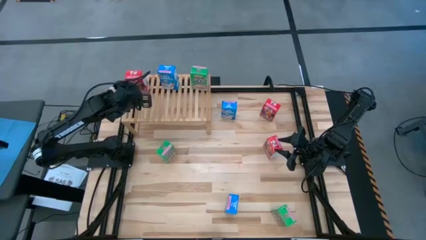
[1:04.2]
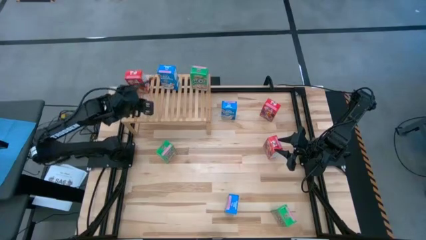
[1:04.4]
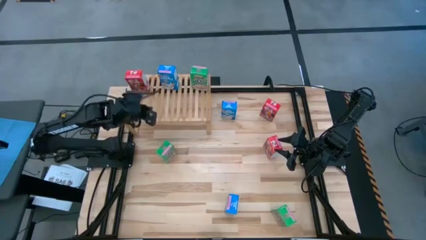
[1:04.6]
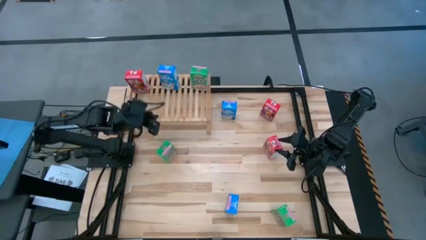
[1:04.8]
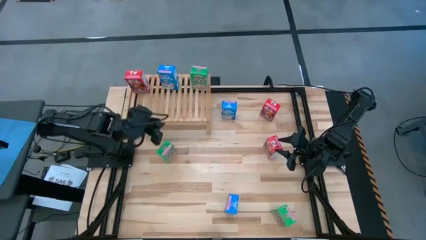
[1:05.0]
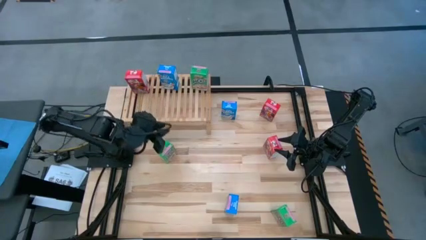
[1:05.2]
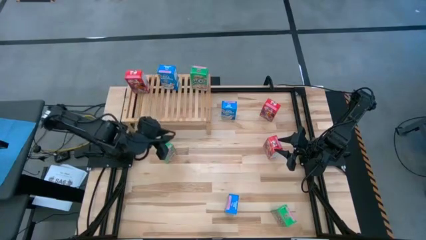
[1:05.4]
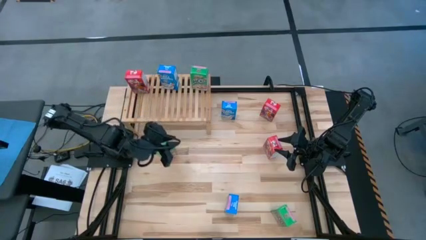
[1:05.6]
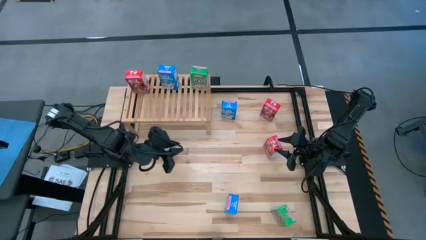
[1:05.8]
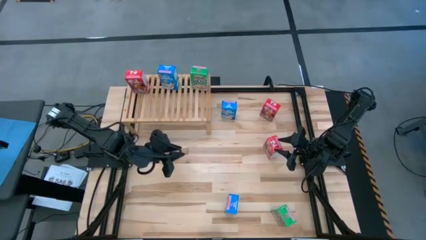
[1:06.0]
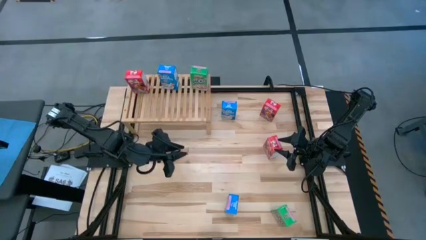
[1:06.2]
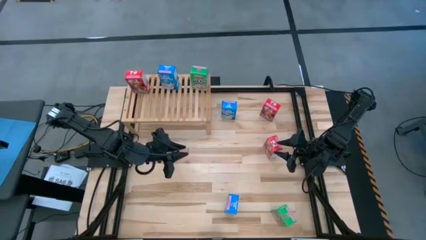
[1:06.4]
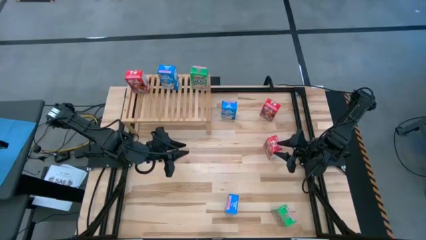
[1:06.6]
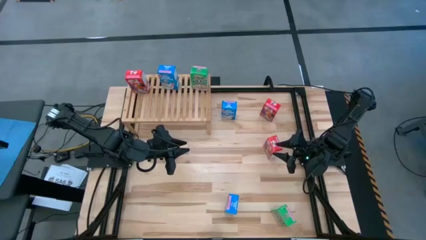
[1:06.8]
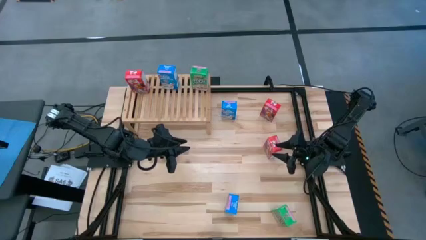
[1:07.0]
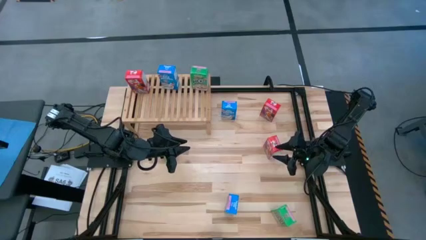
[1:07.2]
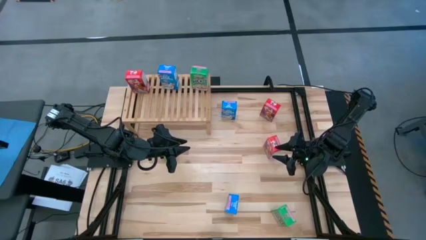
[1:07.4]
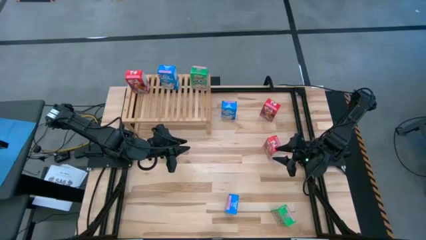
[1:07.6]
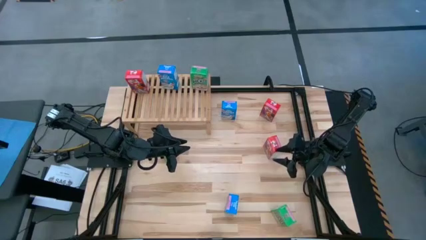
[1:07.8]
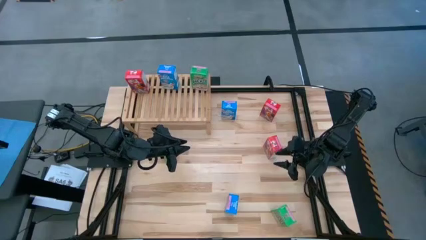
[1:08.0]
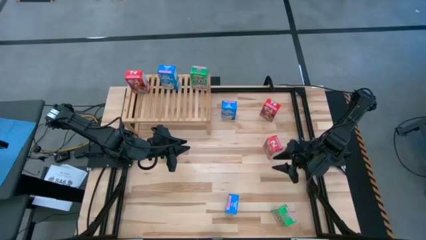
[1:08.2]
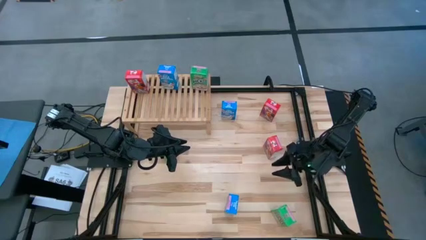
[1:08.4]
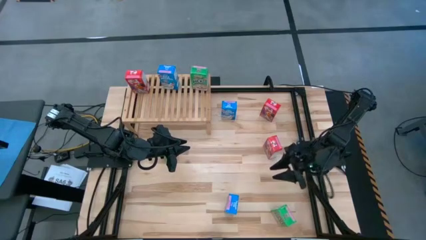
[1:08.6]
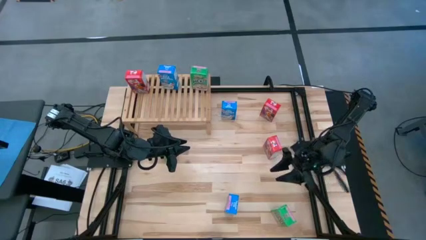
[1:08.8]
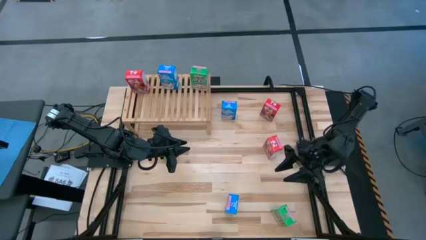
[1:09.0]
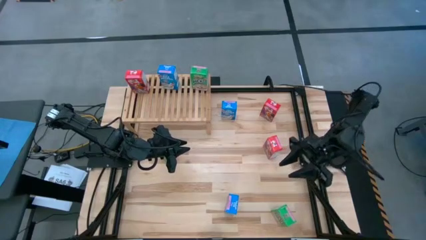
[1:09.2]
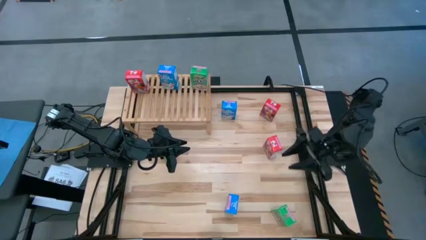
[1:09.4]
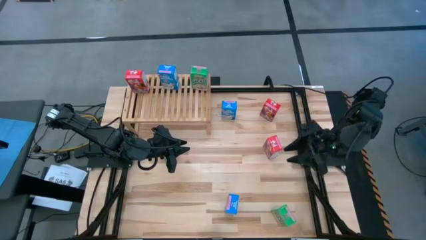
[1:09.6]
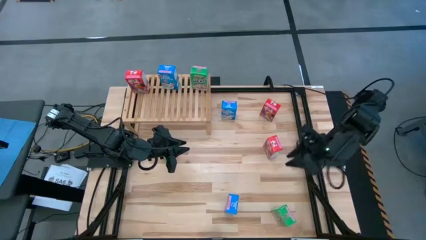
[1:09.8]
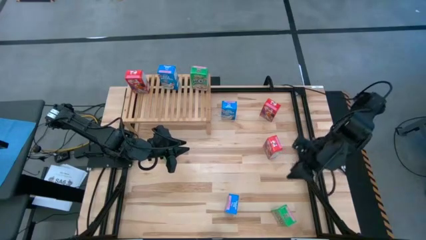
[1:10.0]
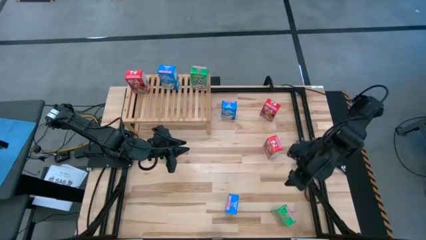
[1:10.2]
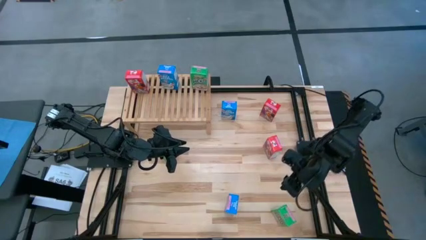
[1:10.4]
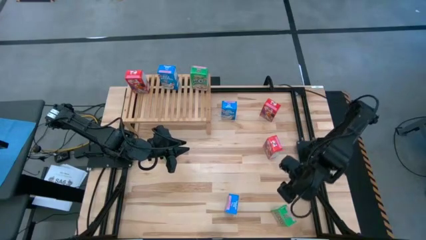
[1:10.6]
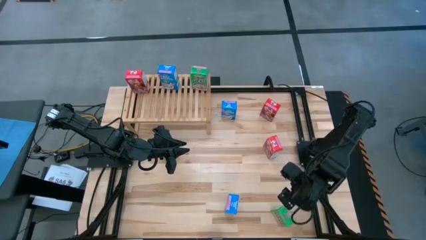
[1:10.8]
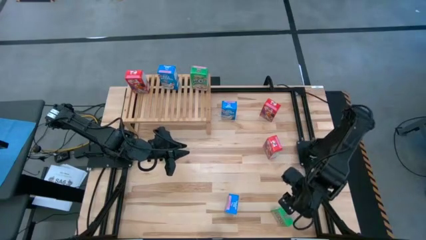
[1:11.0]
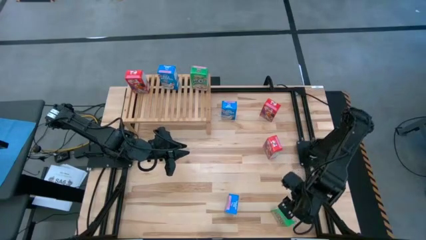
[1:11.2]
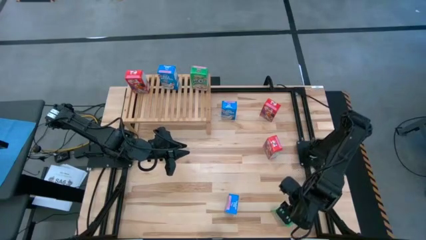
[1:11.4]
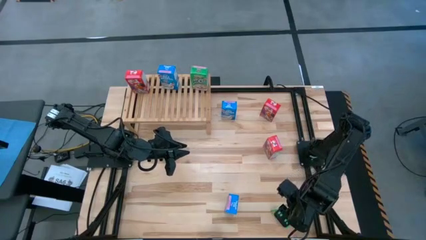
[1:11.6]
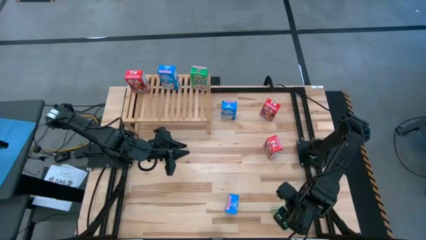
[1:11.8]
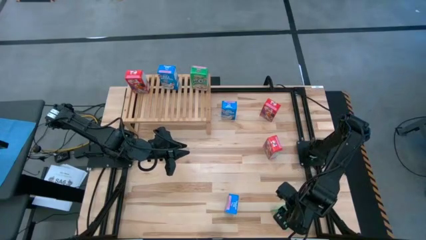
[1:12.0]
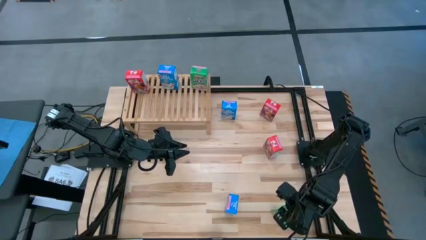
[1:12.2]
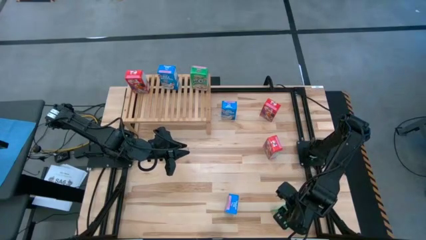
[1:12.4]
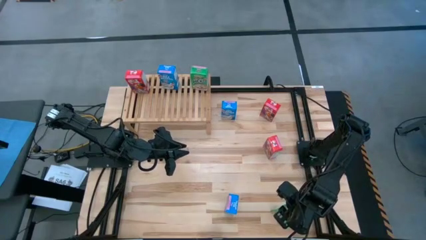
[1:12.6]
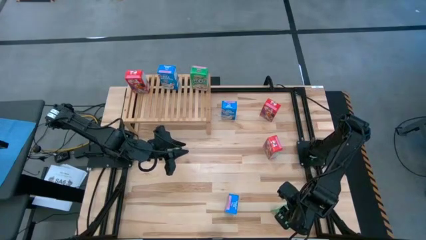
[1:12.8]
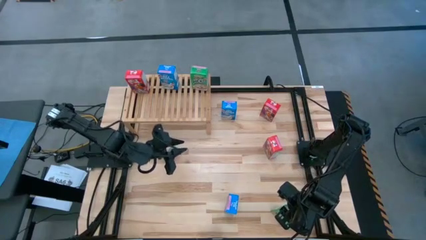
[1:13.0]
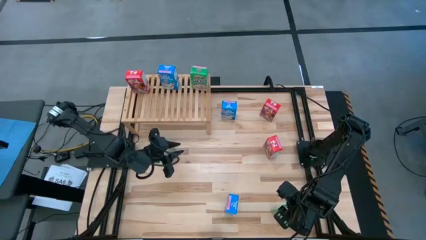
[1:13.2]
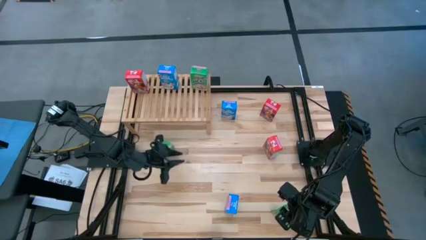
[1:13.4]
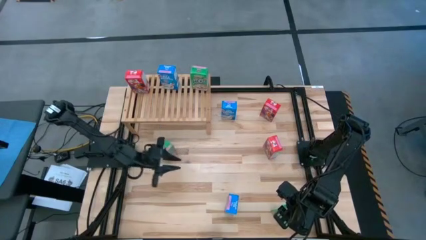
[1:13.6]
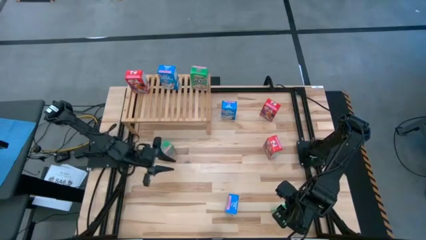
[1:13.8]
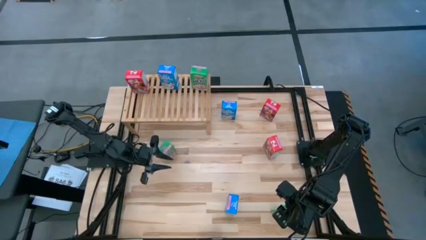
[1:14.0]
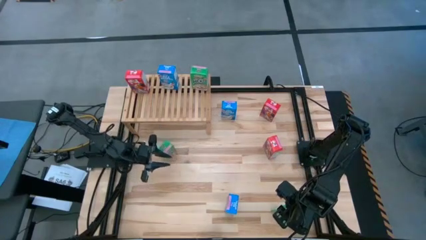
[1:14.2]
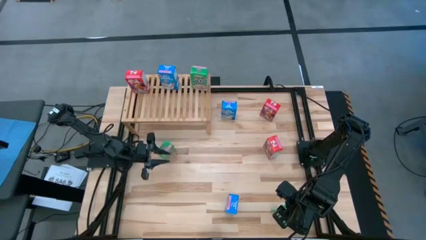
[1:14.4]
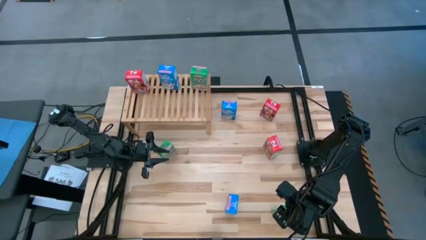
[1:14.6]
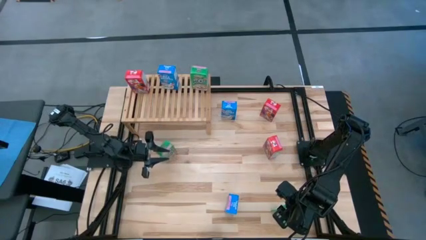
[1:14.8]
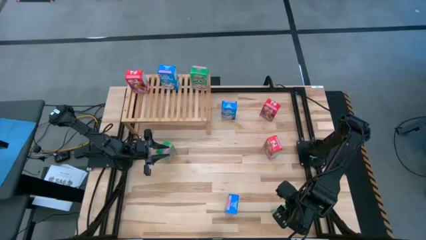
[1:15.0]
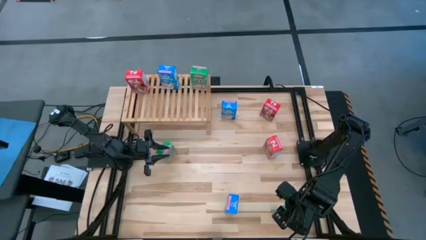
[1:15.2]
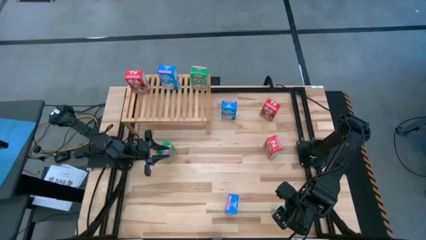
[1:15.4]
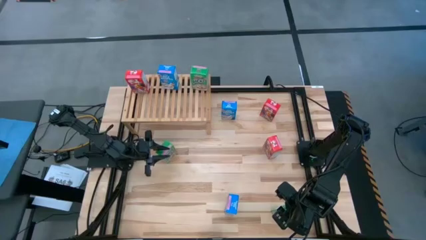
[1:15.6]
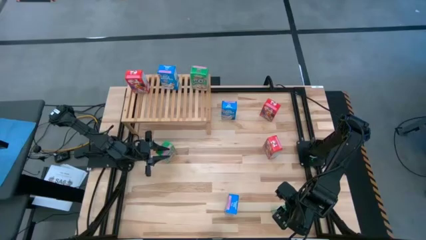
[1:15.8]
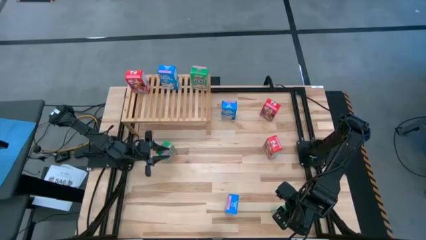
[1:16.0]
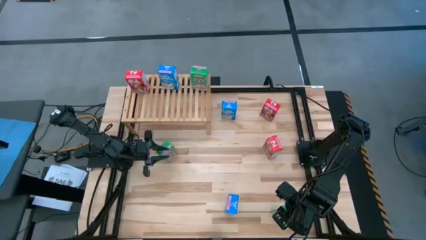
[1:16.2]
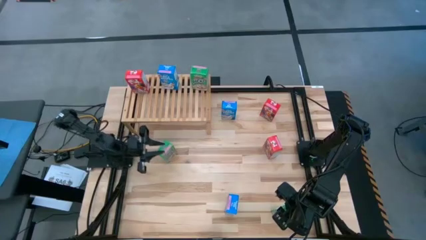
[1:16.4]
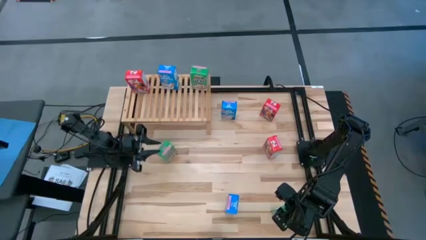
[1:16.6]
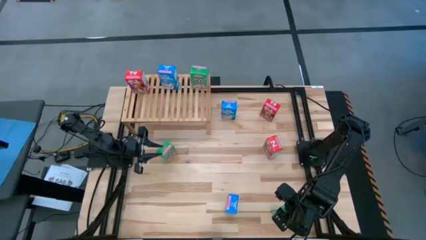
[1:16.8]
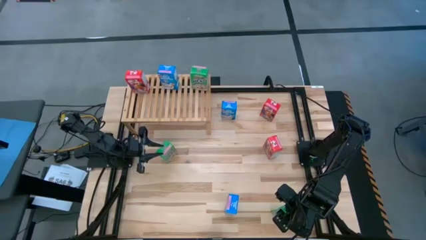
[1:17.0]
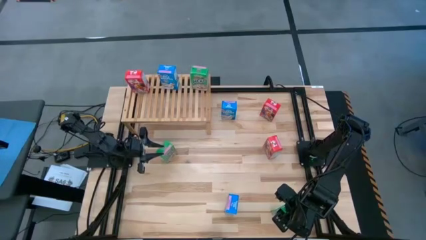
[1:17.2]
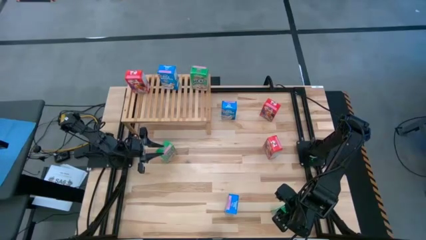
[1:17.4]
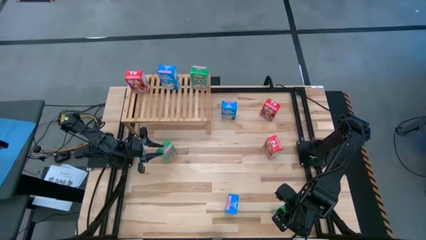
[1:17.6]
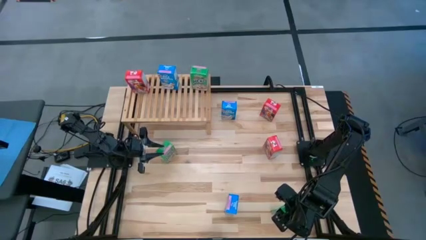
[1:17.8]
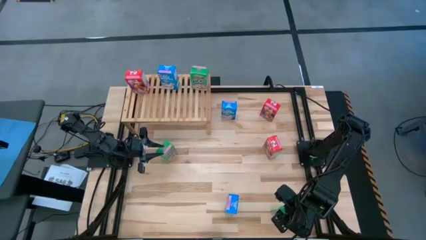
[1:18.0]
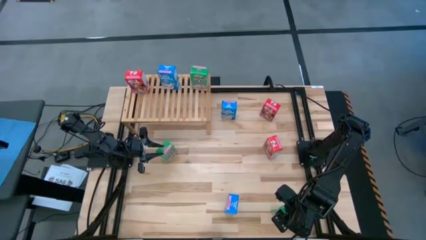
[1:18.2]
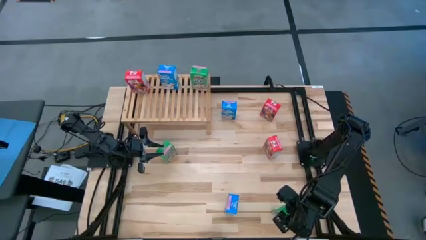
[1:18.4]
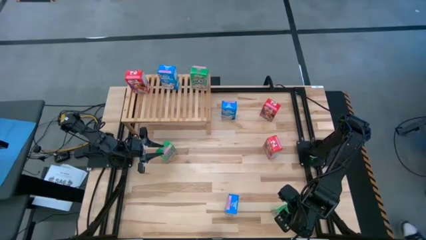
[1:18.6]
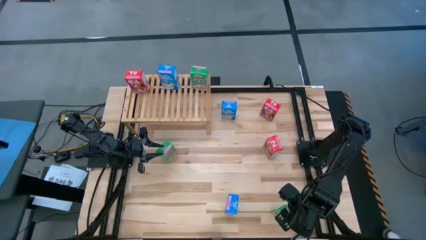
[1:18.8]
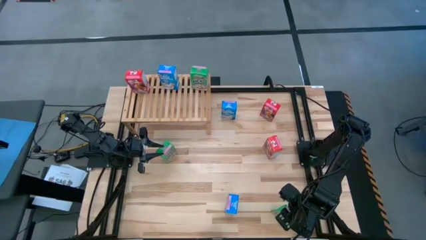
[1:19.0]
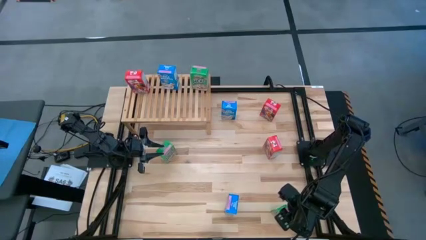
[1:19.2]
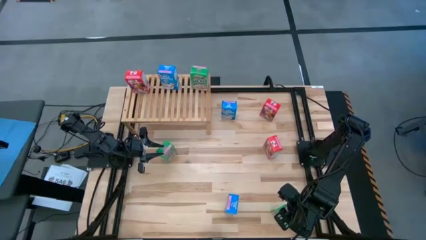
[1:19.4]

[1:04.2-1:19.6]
Task: Stack cereal on shelf
Put the bottom green cereal box on the shelf aligned with the green cereal box
